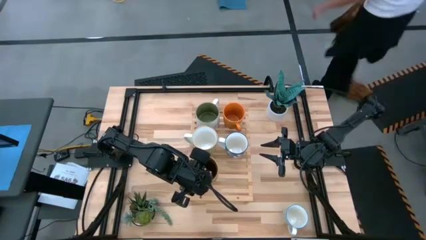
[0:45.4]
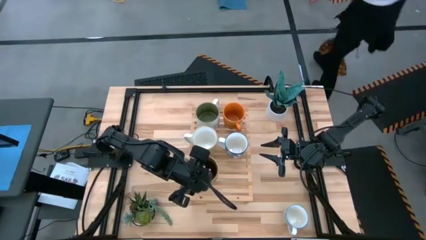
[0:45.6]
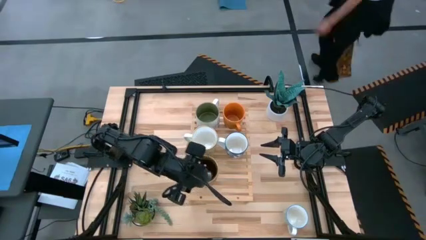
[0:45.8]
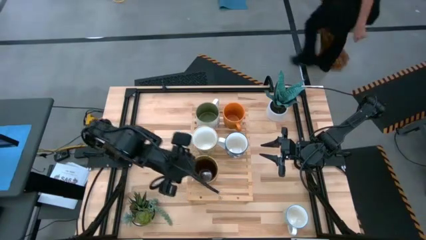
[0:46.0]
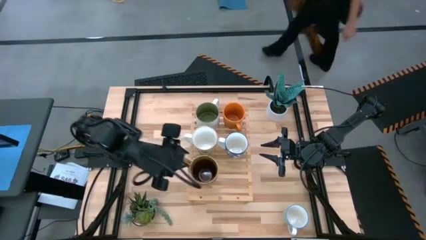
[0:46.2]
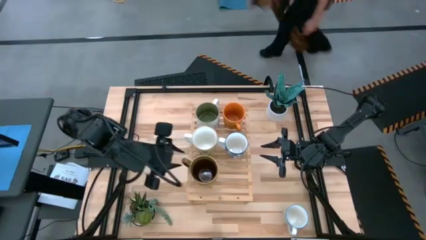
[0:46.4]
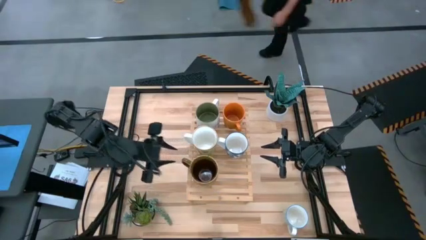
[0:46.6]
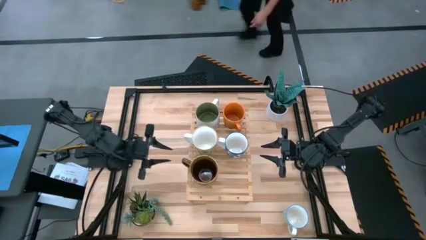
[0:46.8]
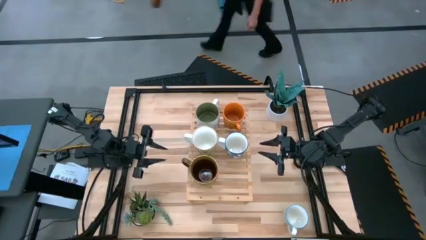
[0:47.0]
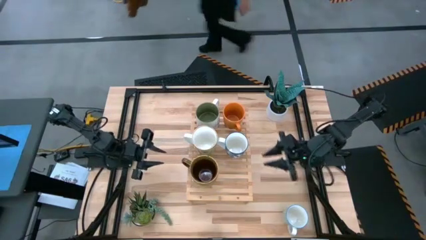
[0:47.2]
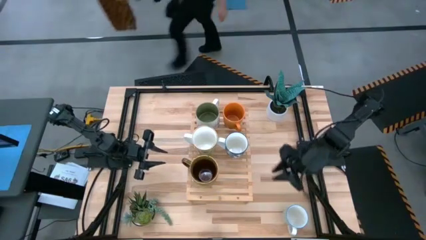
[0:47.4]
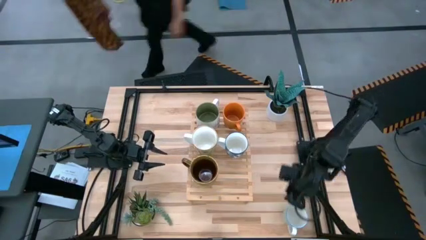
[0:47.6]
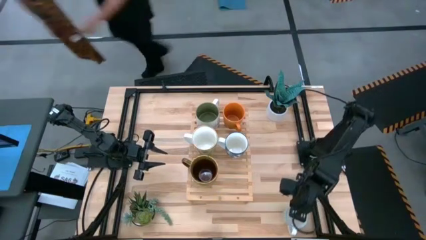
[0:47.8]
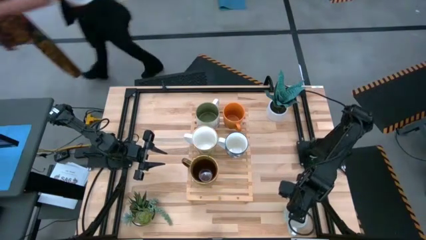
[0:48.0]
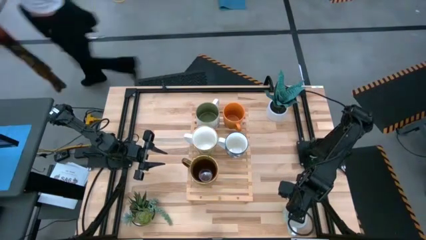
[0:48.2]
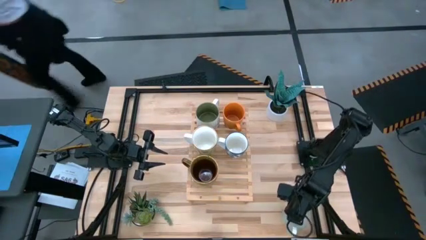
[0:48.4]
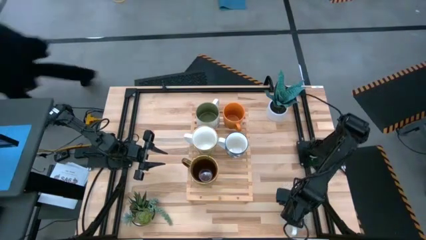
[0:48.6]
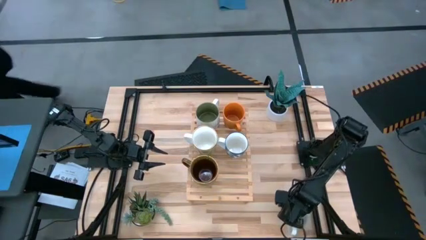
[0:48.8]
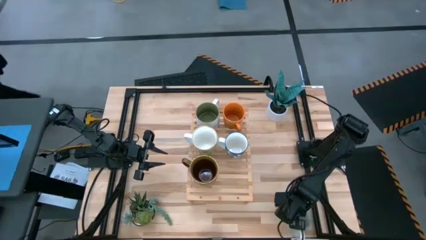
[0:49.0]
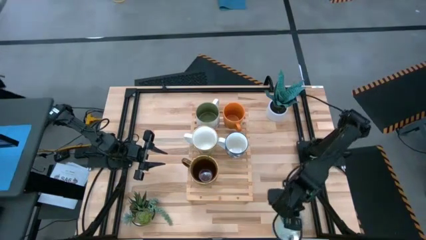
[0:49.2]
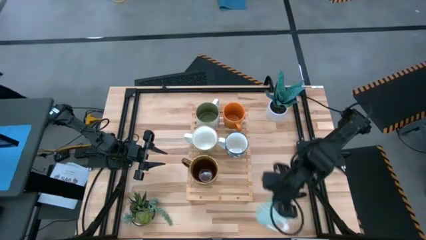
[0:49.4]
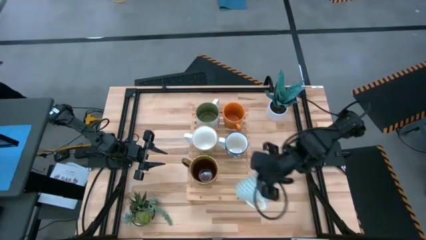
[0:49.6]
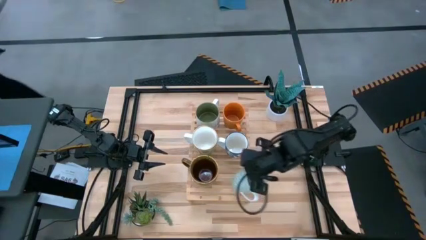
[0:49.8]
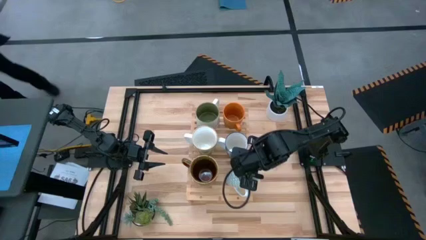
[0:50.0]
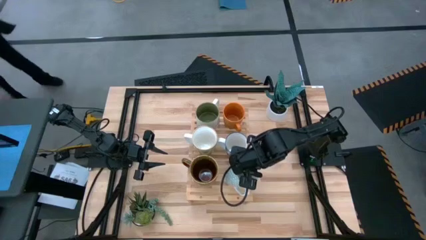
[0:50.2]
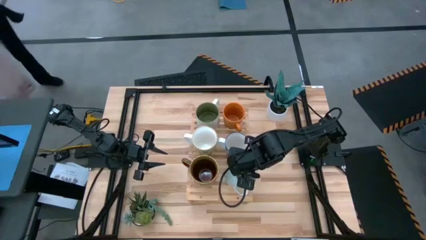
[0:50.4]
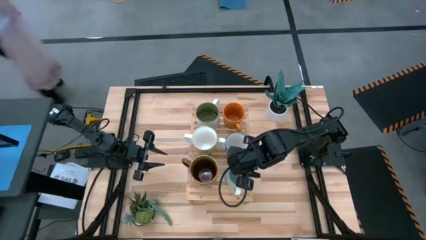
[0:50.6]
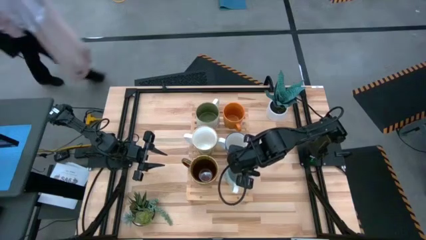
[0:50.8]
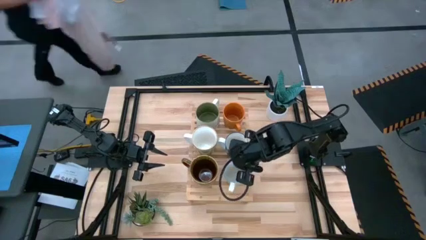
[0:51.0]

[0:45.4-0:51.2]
Task: Place coffee mugs
Put the green mug on the shelf

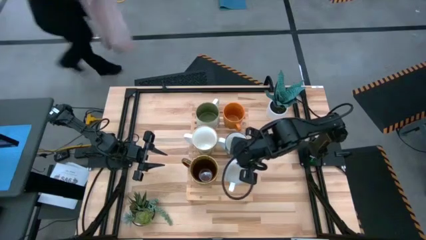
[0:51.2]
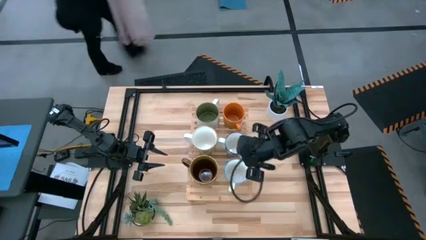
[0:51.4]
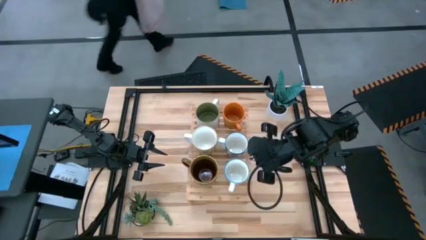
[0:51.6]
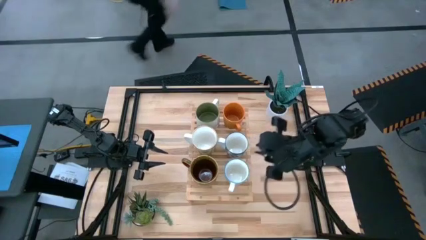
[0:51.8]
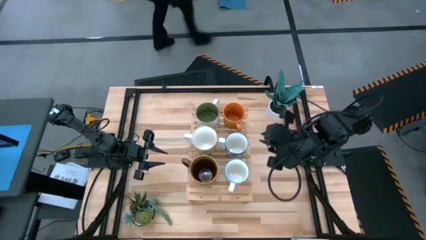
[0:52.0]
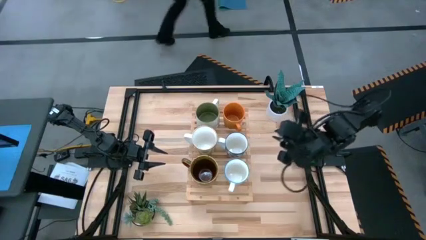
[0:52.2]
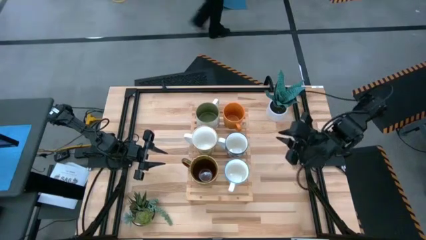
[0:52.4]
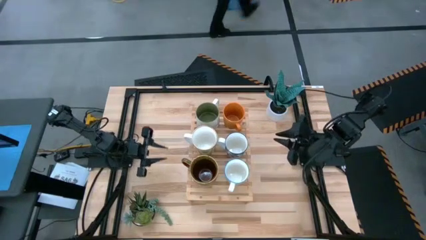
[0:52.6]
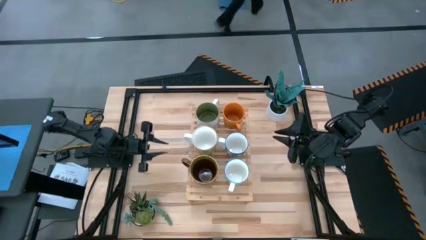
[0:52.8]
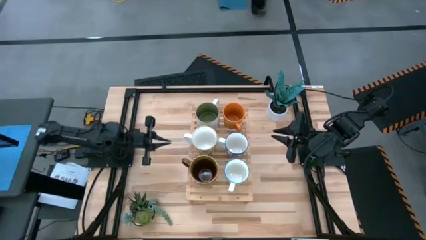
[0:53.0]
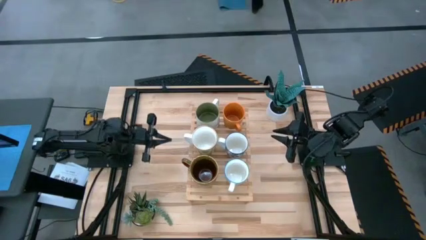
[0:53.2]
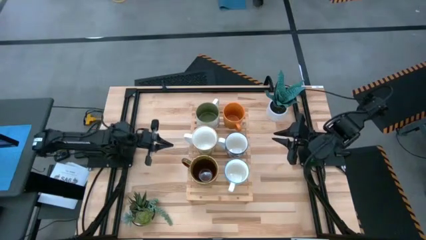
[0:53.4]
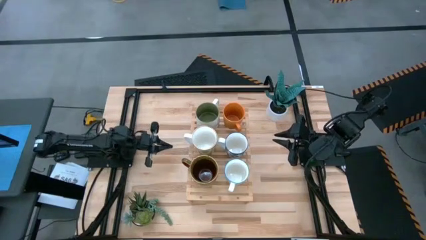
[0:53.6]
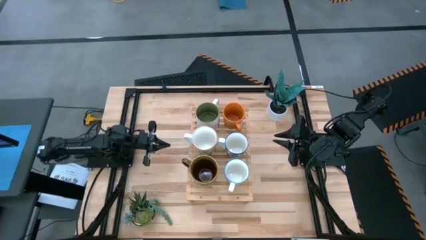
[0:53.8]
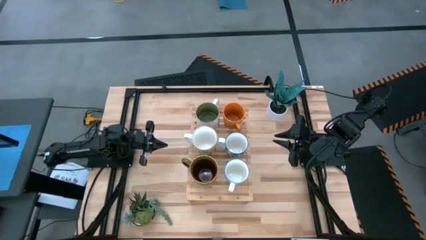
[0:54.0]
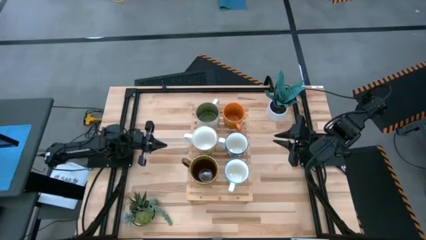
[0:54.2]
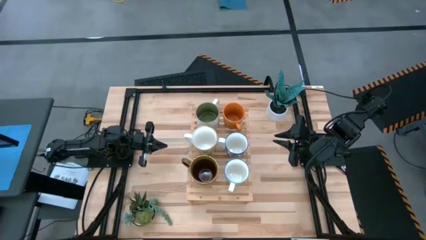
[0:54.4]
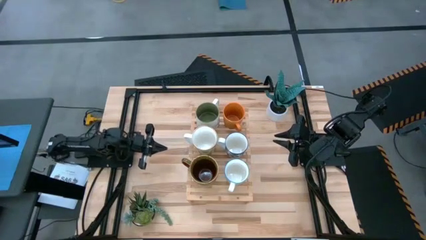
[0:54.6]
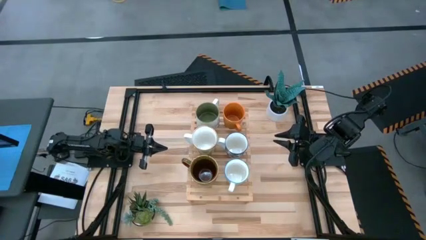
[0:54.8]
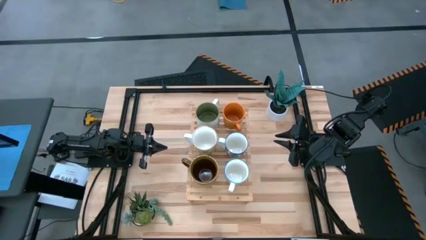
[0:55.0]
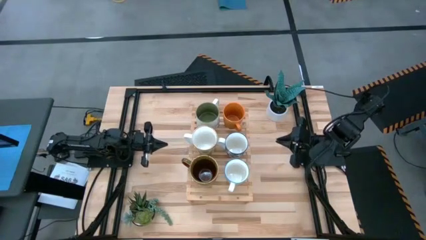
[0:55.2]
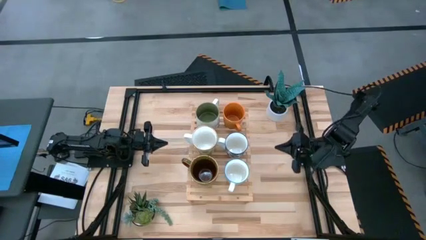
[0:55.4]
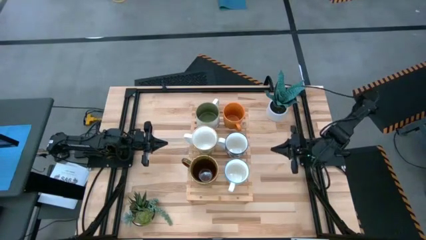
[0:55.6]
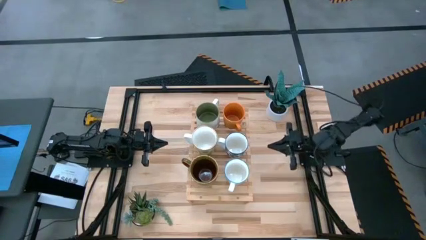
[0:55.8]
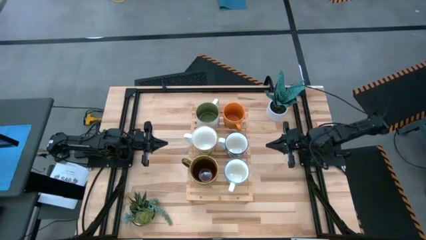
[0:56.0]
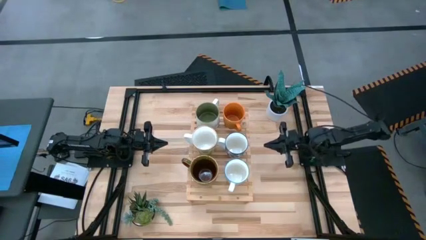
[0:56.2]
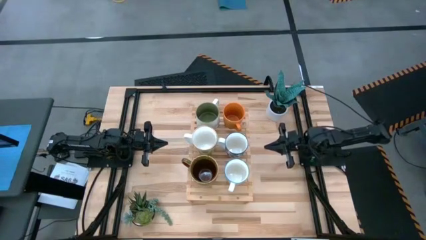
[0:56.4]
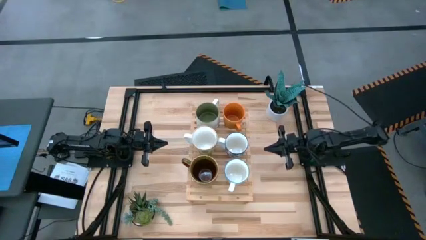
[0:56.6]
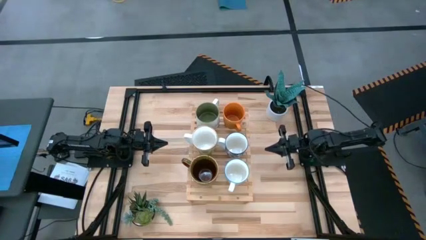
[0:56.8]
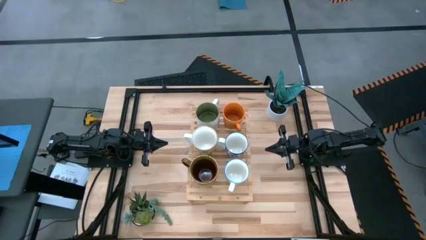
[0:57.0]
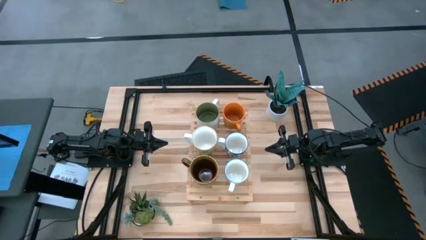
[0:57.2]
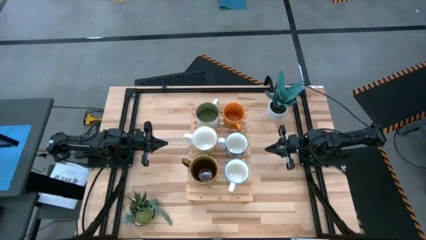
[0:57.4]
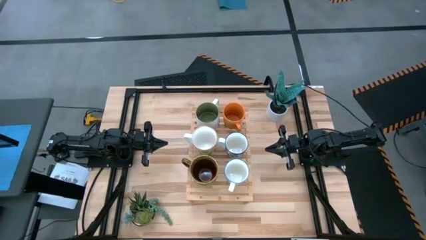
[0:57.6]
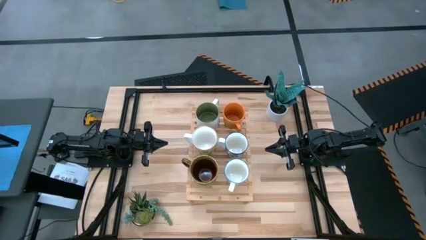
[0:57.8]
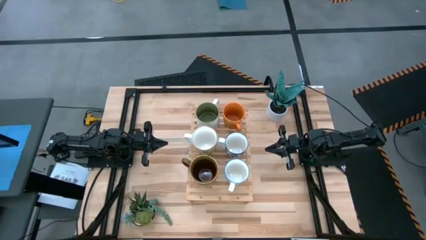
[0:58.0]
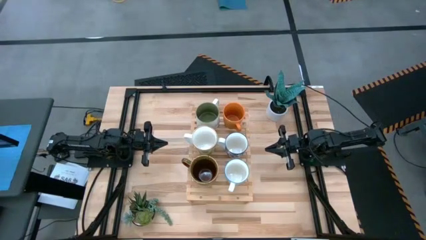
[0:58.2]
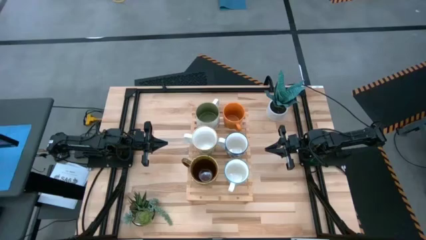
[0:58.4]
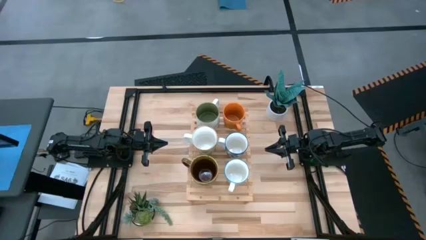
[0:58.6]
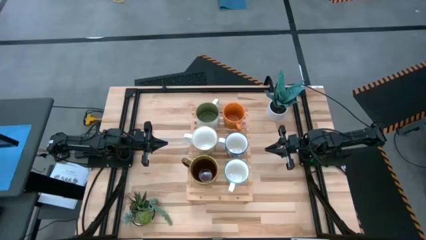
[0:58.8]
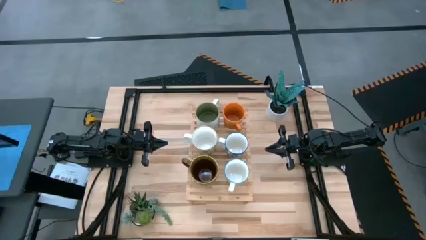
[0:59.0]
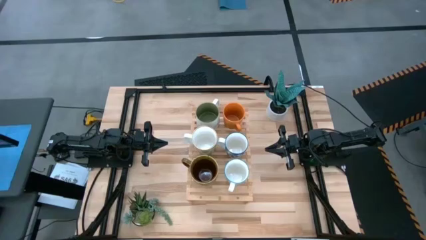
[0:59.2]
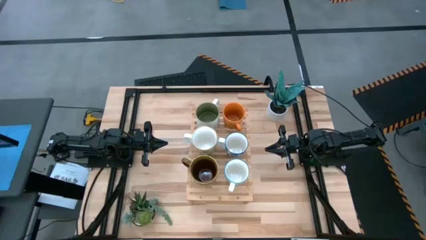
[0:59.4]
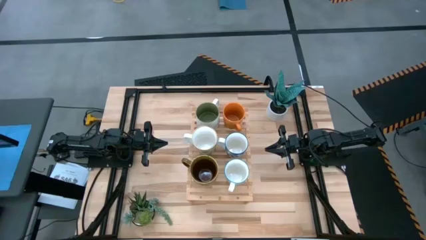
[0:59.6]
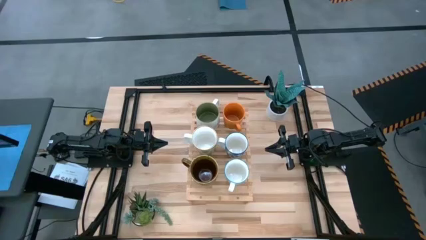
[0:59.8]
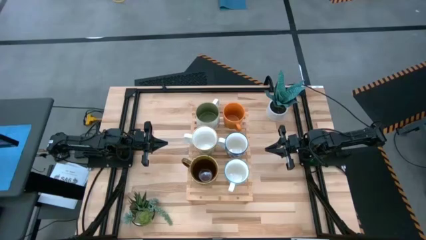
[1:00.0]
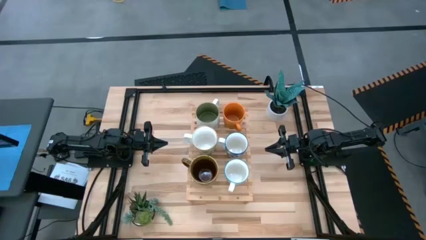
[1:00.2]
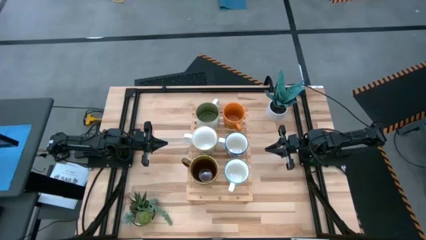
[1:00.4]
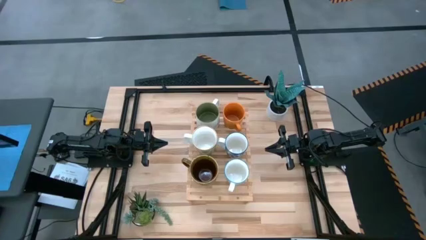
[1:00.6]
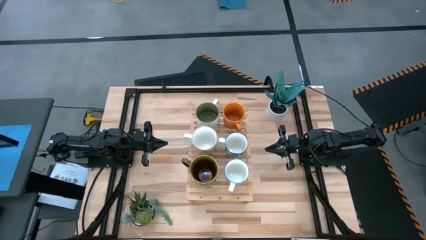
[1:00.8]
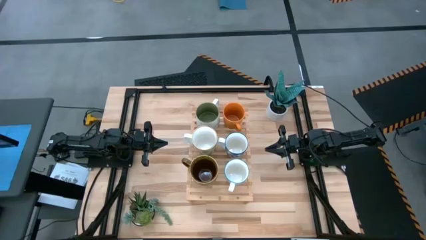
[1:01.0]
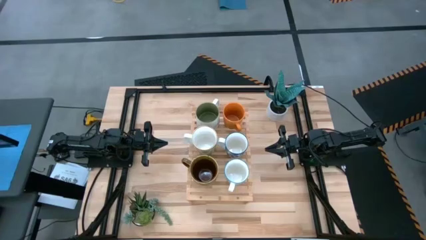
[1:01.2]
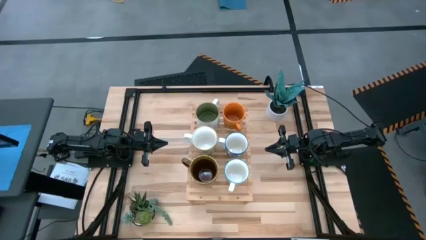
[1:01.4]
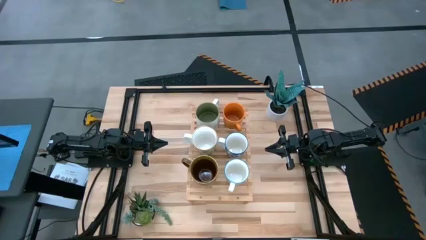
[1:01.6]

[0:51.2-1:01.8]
Return to Home Position
